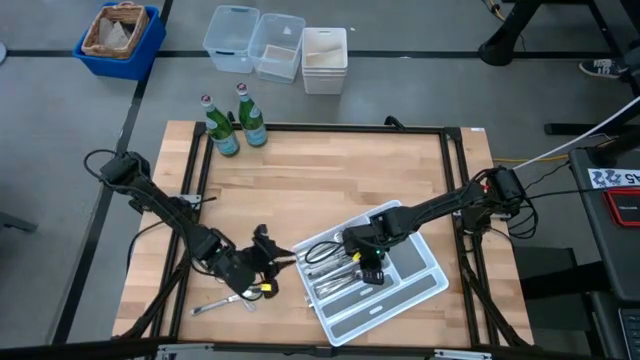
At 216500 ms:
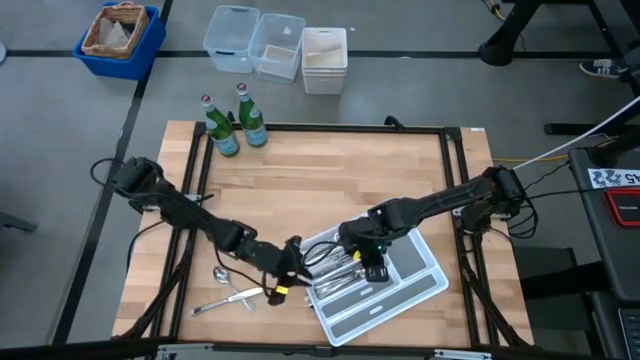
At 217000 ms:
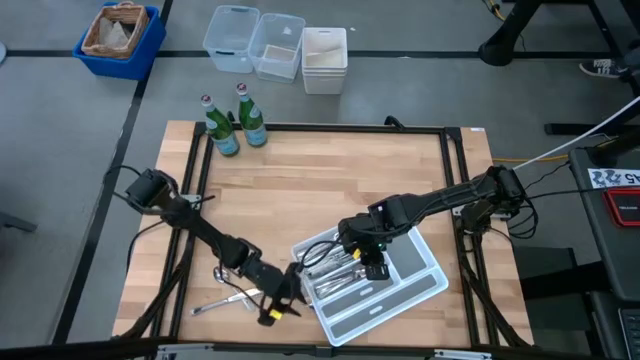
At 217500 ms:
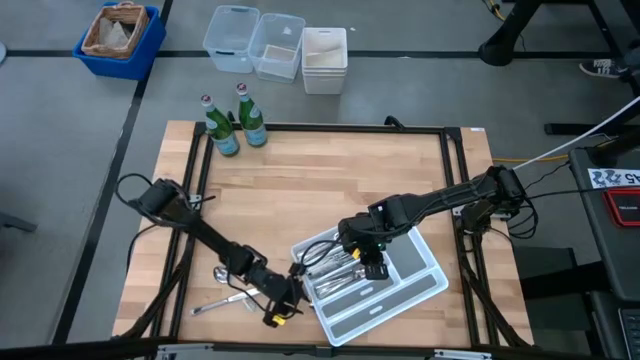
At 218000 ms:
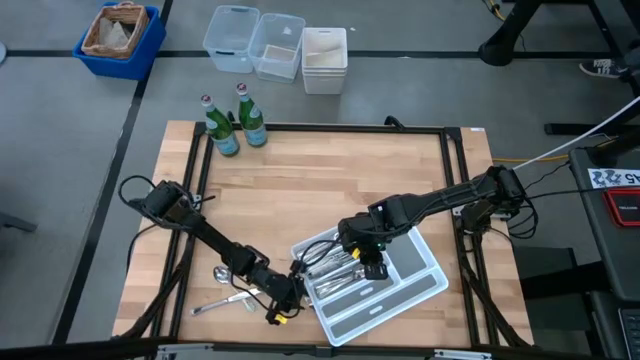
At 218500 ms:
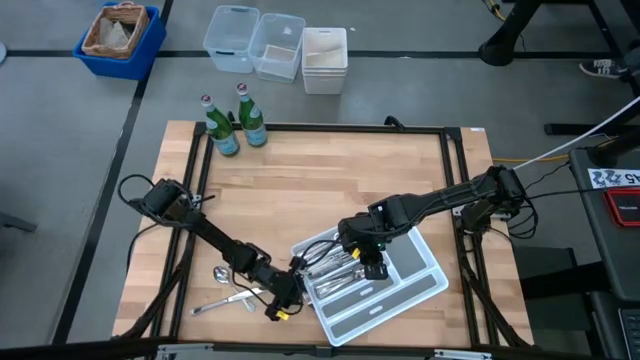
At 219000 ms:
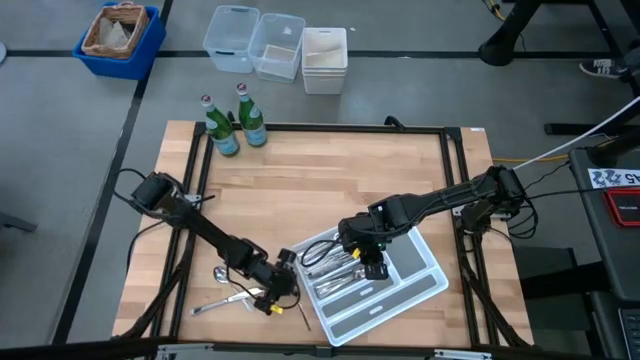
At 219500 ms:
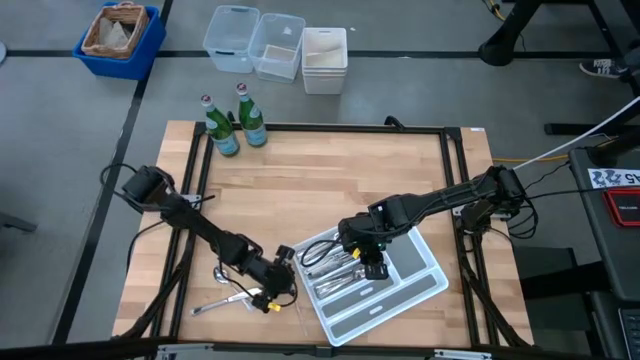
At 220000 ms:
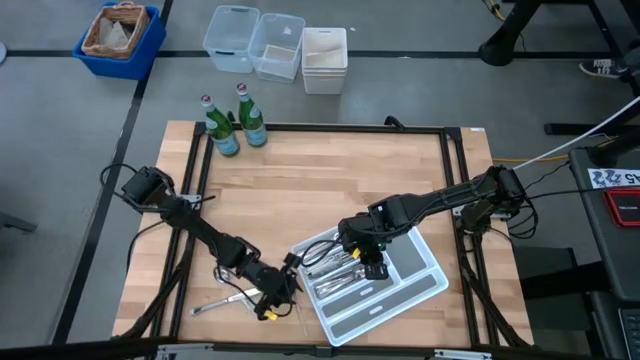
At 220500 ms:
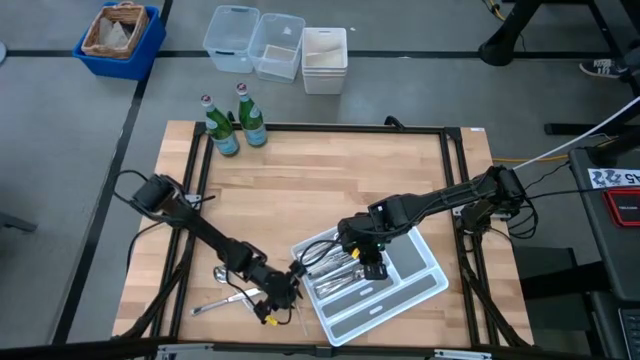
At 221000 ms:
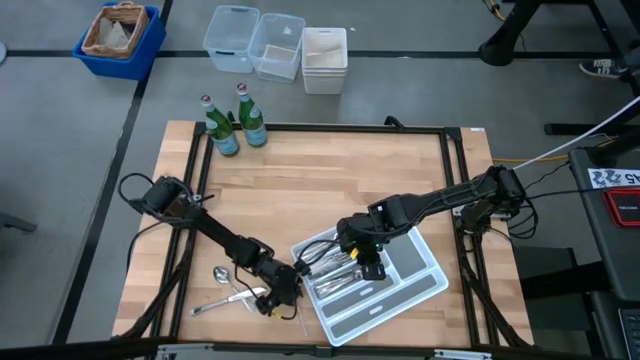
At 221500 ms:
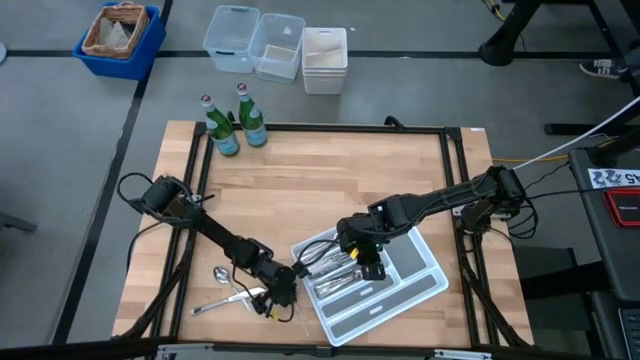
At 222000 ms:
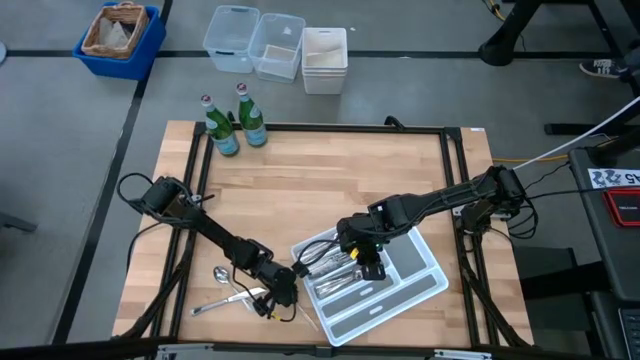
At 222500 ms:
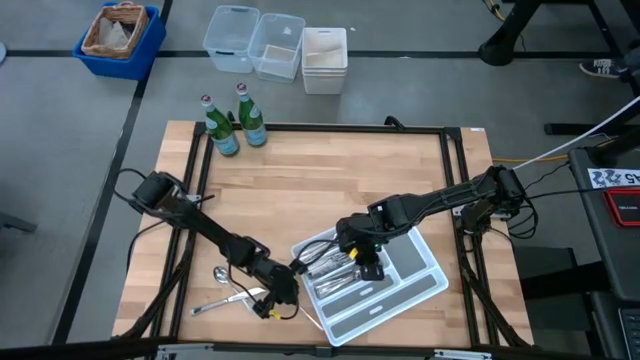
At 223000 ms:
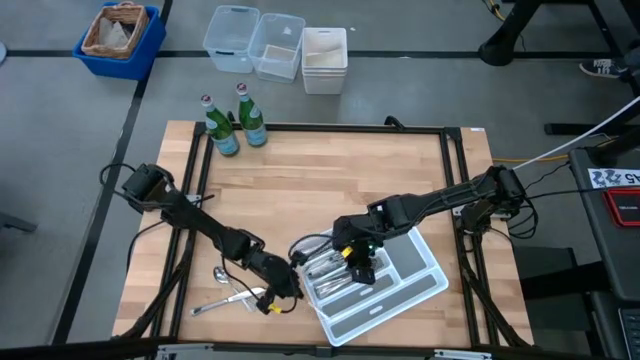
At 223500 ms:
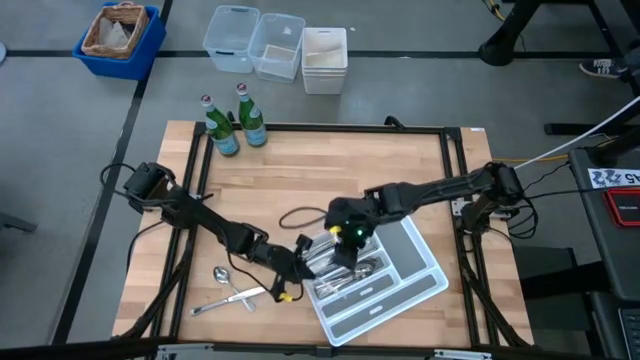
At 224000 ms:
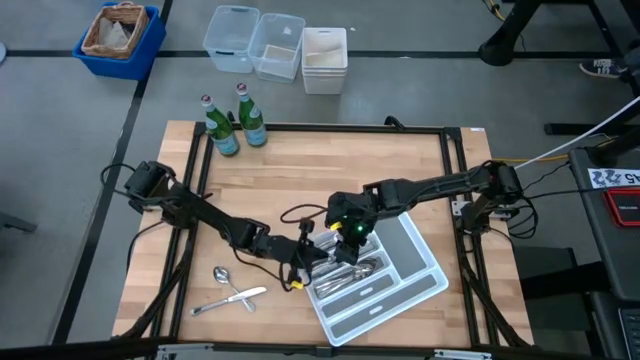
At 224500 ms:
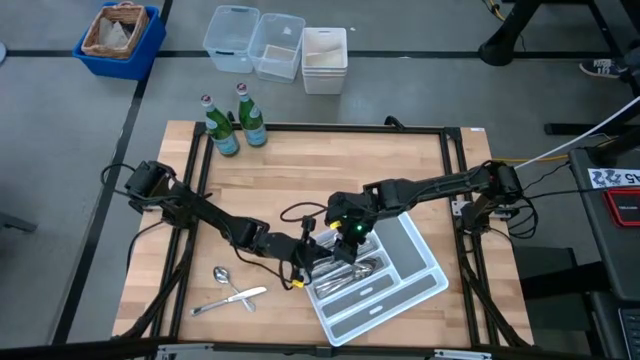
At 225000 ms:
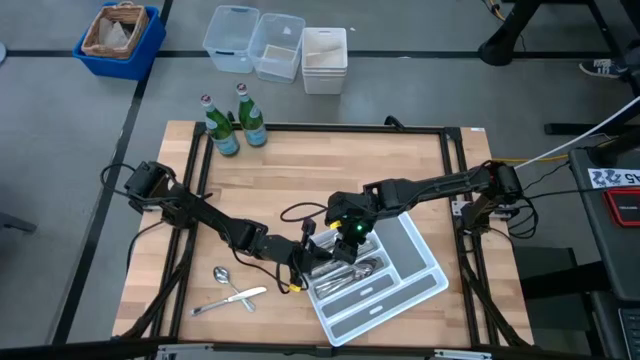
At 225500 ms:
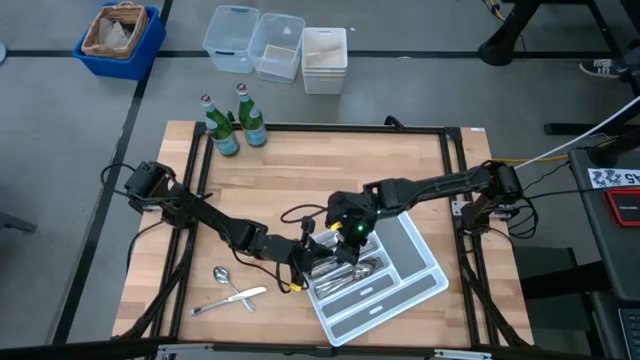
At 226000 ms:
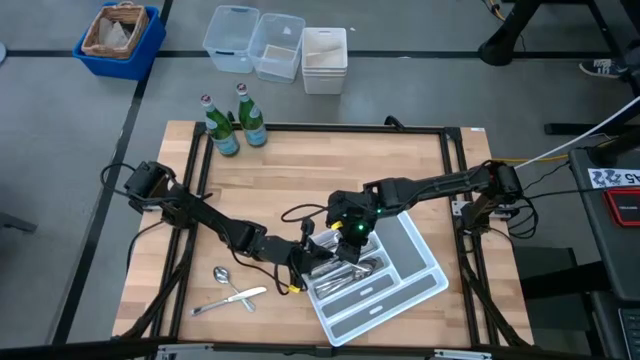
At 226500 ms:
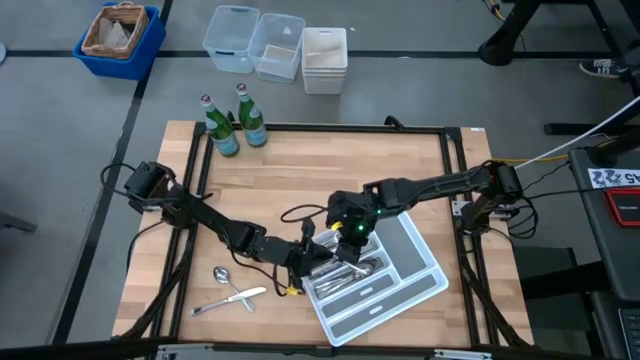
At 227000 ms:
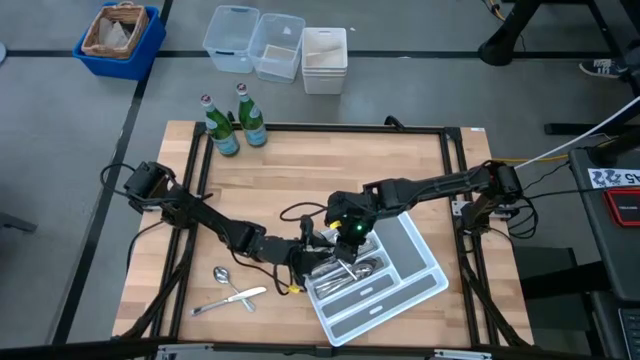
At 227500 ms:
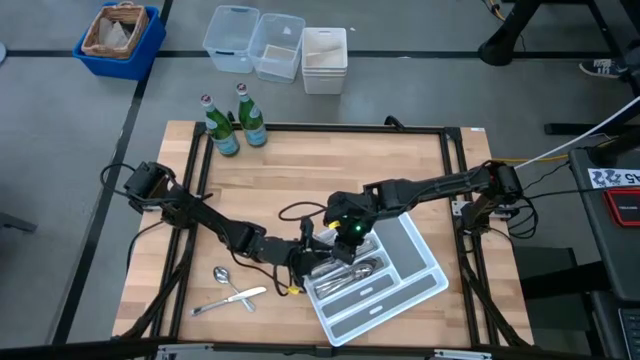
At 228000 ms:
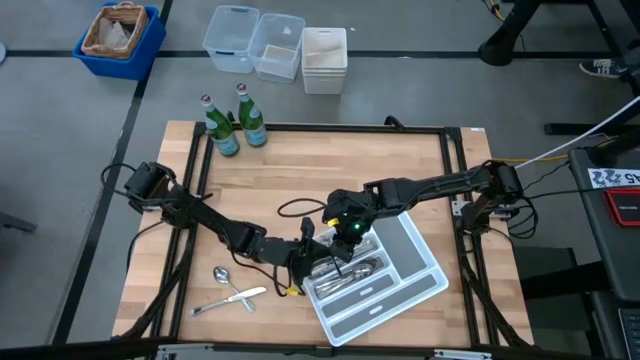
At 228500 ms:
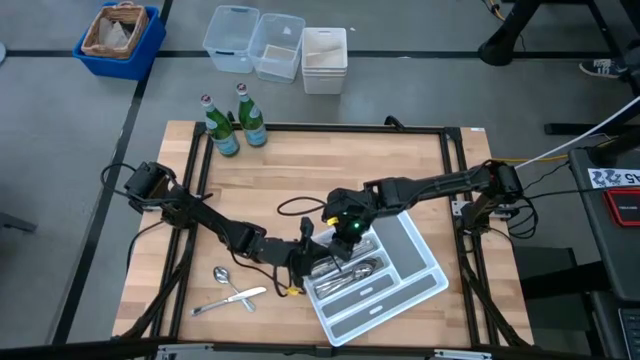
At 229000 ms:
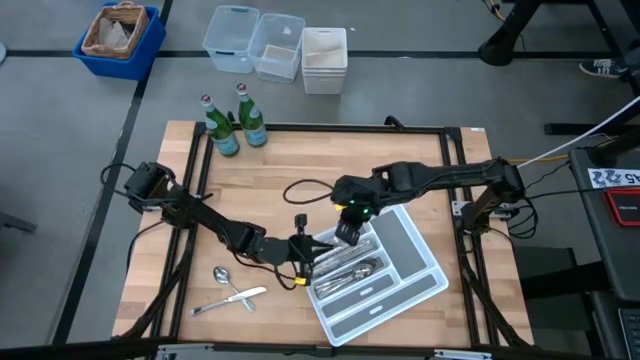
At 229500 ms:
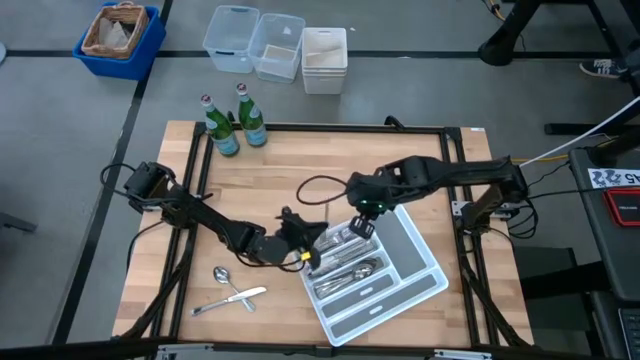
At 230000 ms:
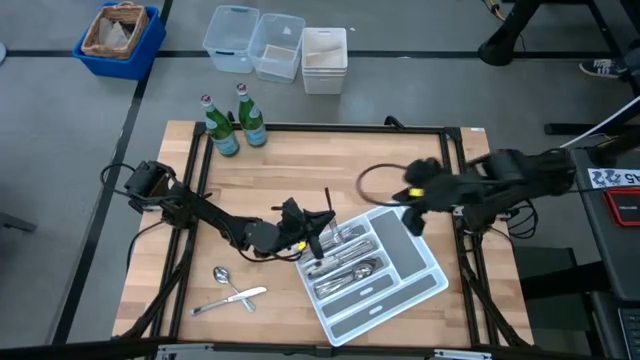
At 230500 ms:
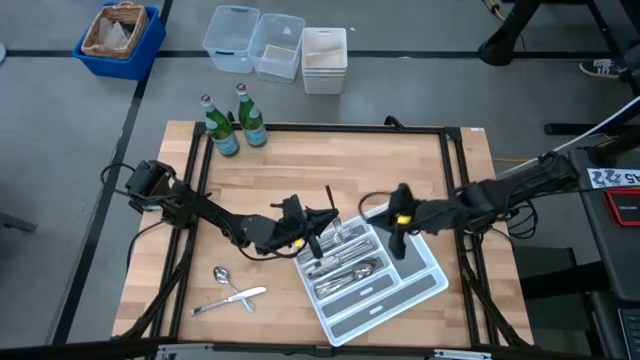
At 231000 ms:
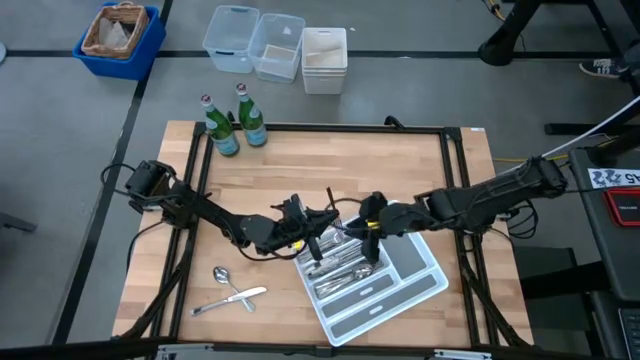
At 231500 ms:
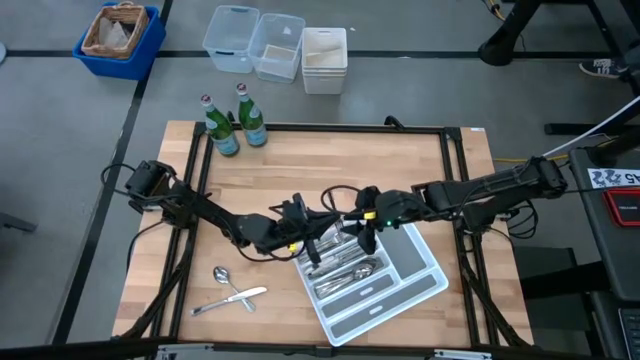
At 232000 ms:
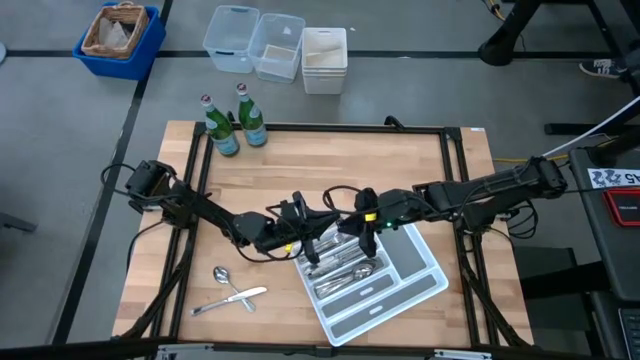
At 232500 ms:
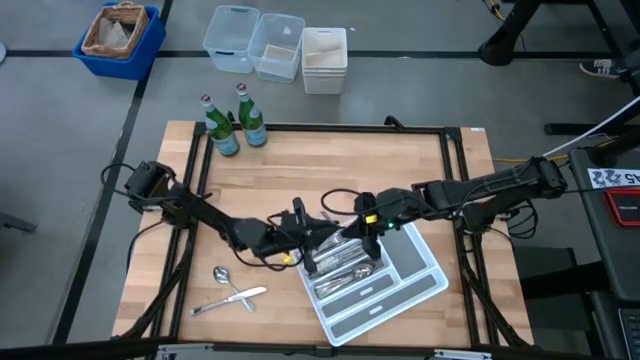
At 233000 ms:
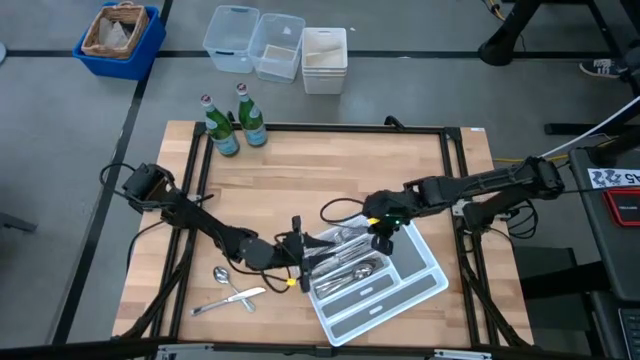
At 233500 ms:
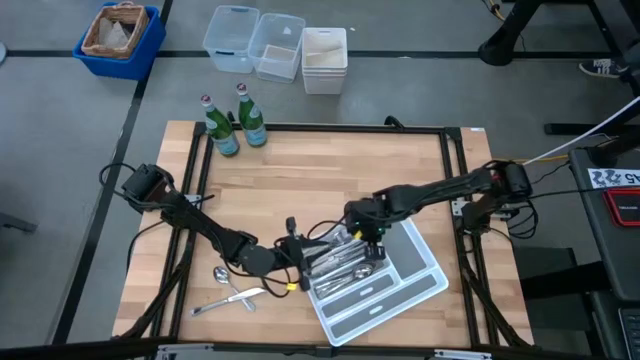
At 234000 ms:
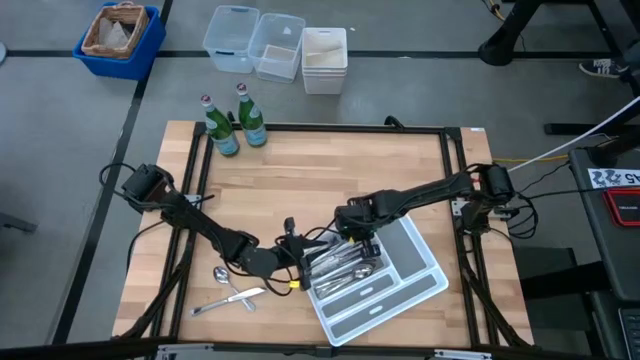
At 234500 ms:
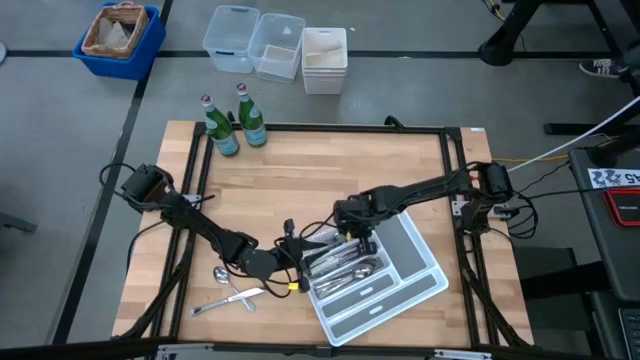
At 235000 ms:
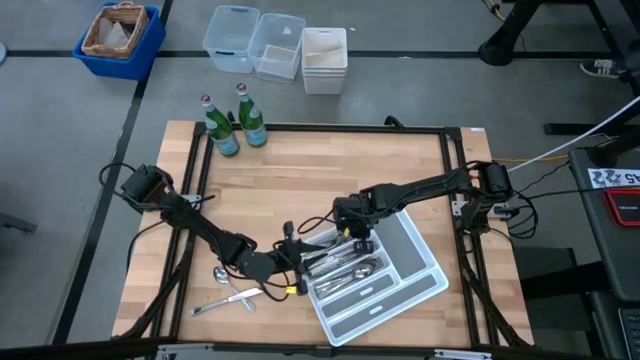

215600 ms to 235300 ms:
Task: Sort silverware
Put the silver fork into the white silverware tray

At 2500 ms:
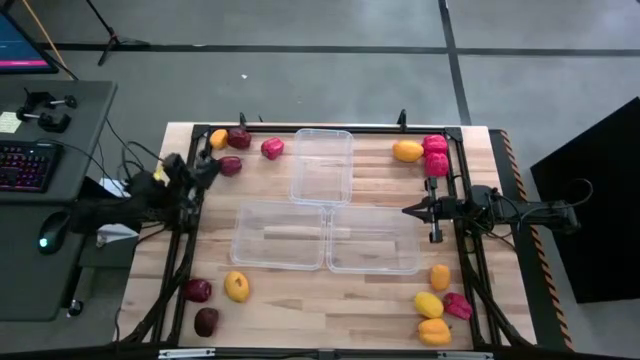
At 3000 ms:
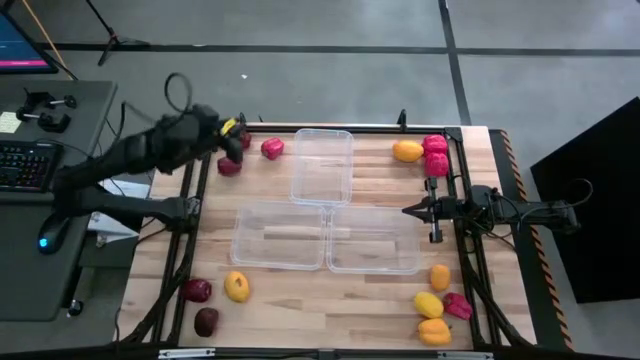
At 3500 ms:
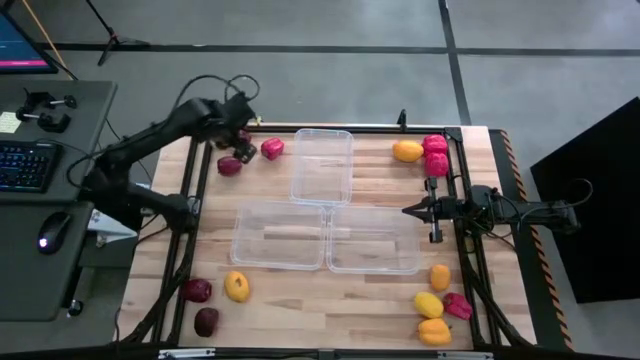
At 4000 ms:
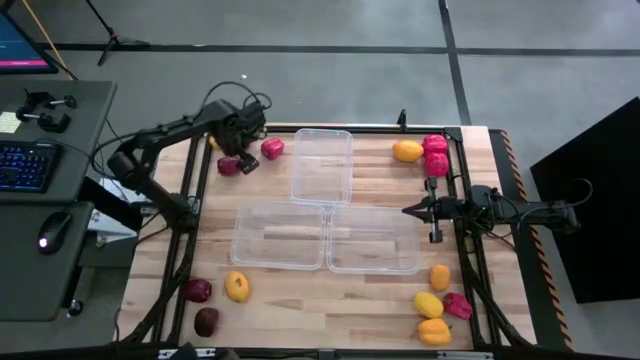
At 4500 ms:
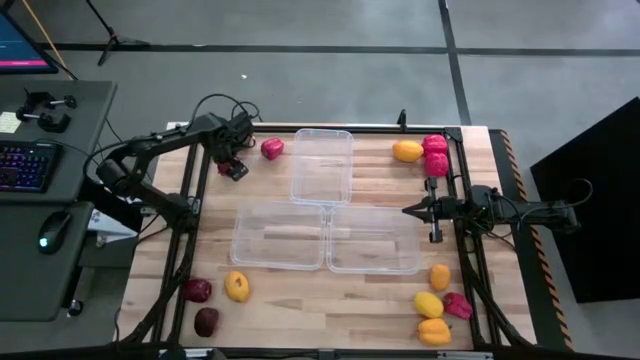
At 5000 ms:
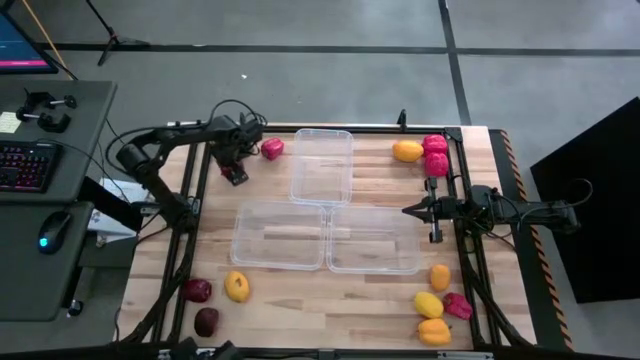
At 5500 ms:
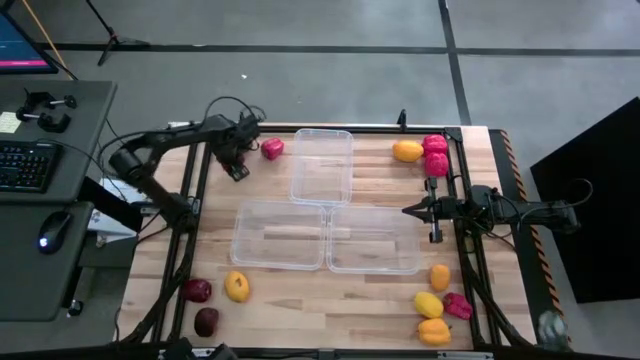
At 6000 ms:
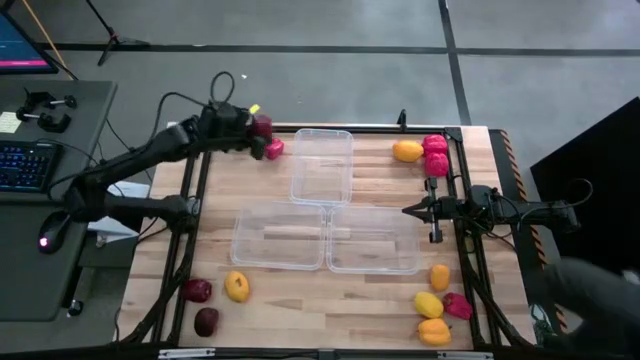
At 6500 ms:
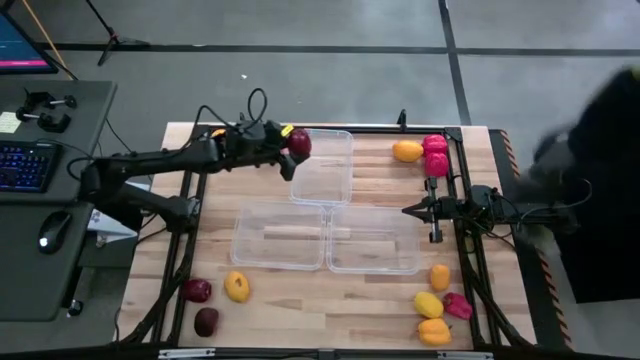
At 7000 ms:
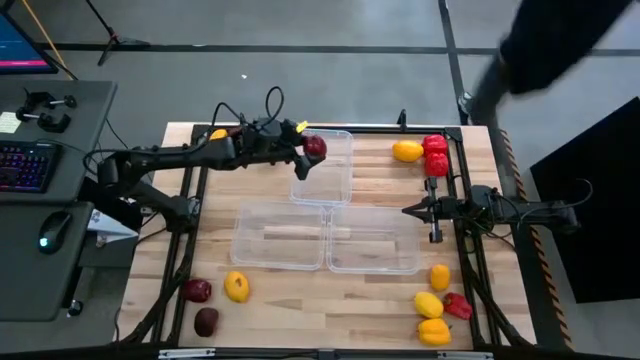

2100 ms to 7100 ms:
Task: Sort produce into baskets
Put the top left red apple into the top center transparent bin
